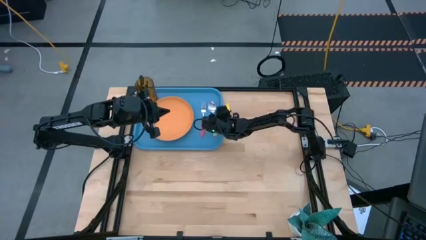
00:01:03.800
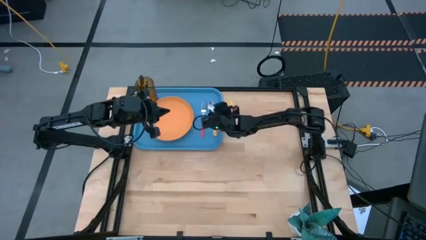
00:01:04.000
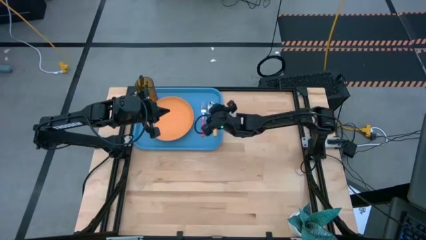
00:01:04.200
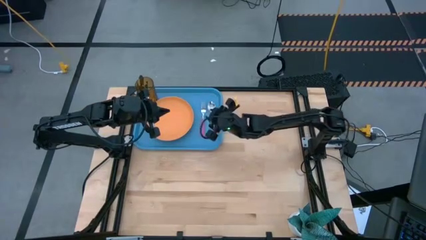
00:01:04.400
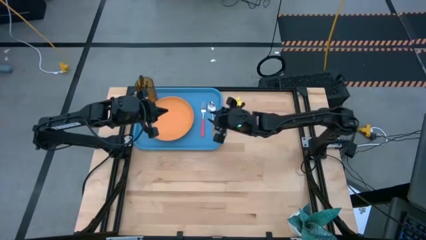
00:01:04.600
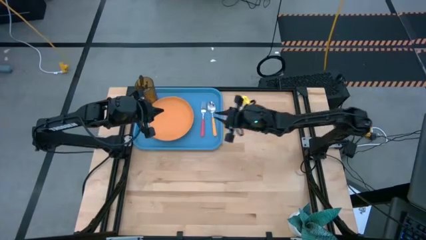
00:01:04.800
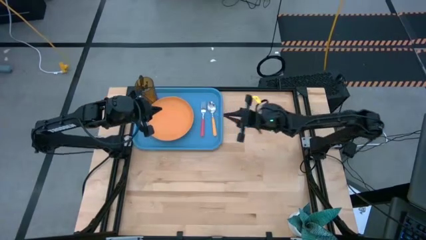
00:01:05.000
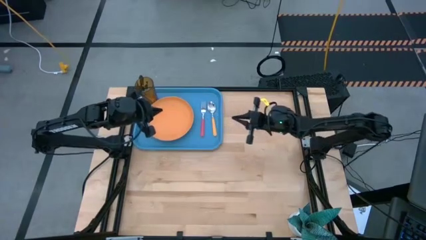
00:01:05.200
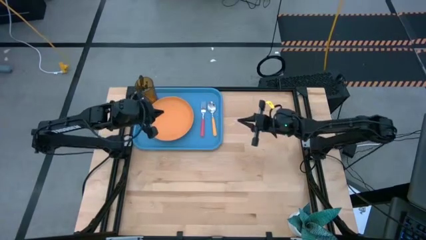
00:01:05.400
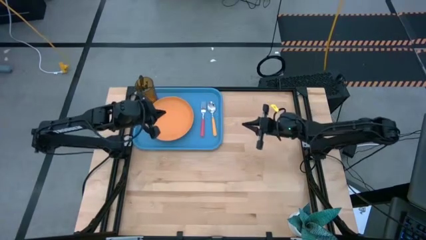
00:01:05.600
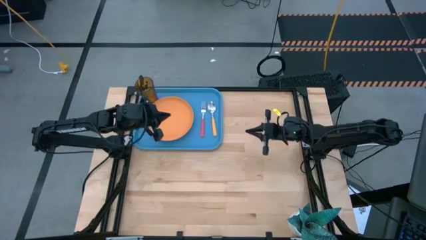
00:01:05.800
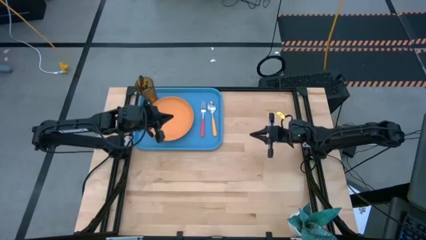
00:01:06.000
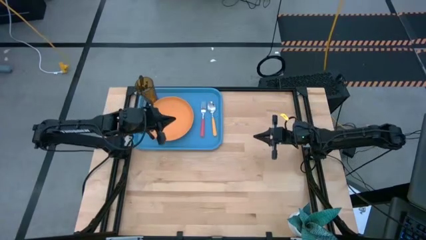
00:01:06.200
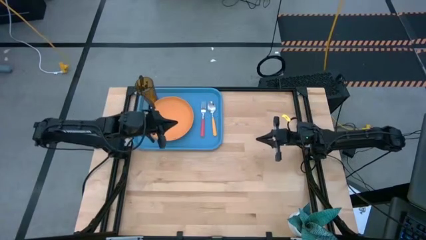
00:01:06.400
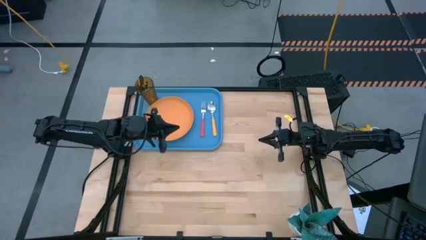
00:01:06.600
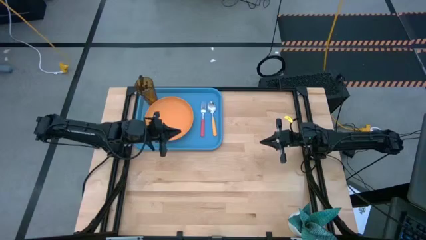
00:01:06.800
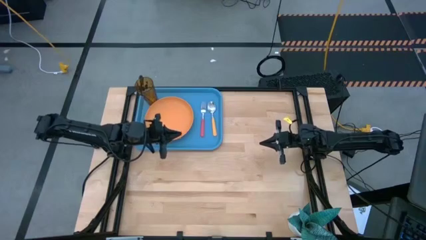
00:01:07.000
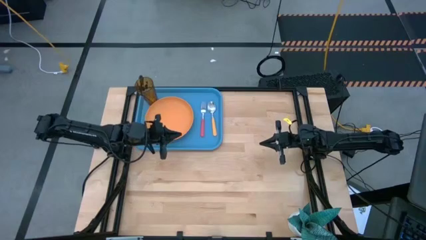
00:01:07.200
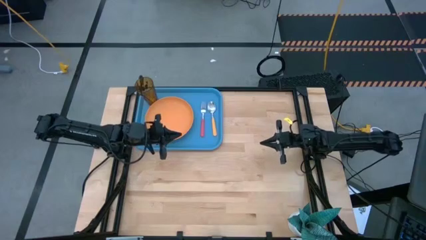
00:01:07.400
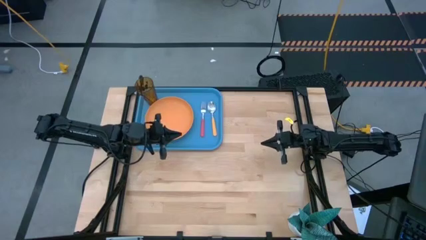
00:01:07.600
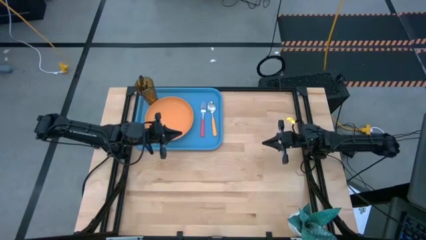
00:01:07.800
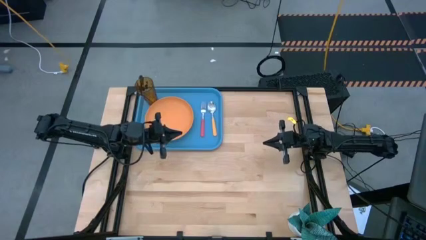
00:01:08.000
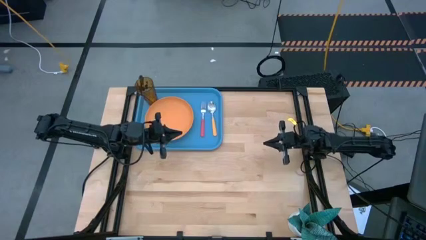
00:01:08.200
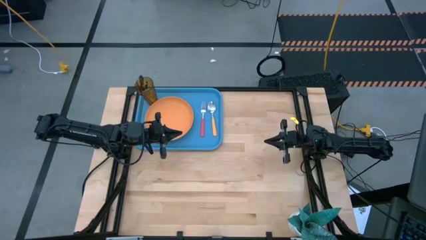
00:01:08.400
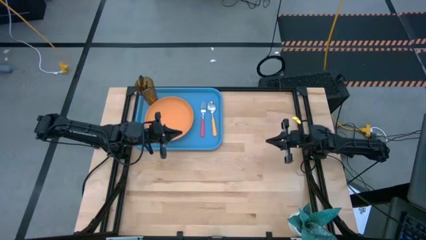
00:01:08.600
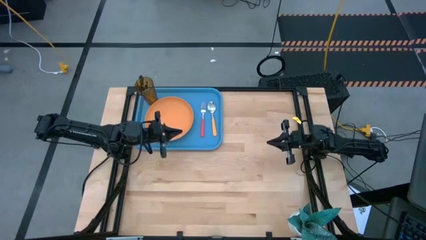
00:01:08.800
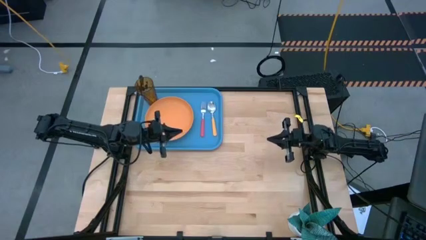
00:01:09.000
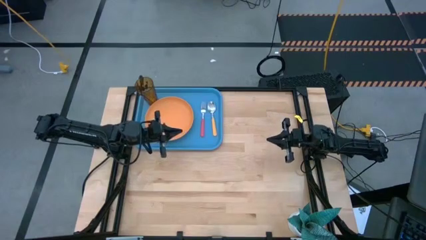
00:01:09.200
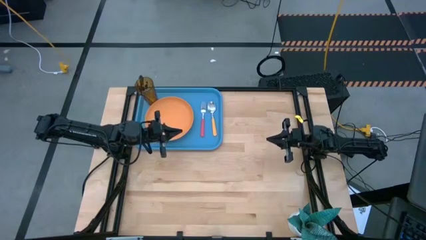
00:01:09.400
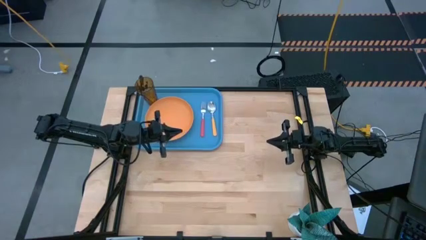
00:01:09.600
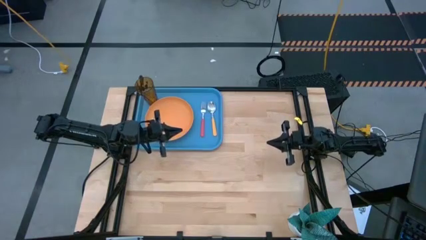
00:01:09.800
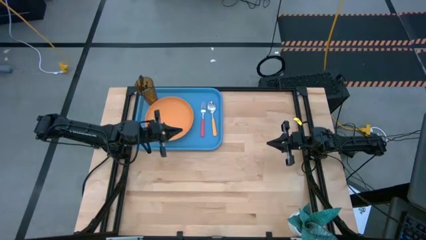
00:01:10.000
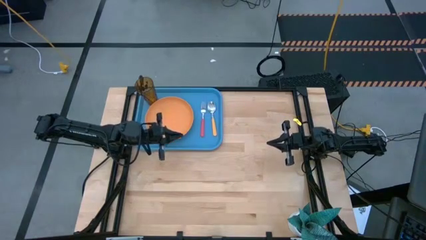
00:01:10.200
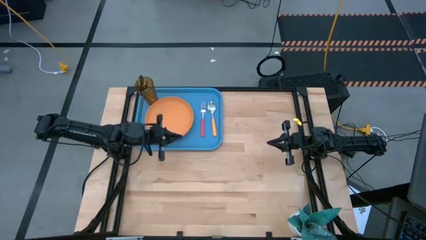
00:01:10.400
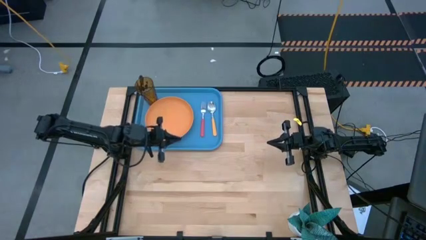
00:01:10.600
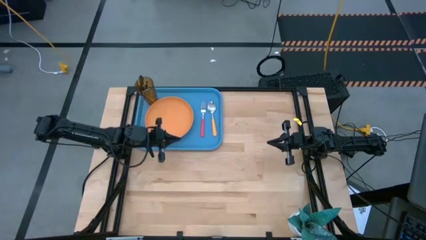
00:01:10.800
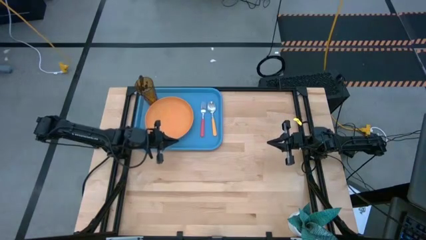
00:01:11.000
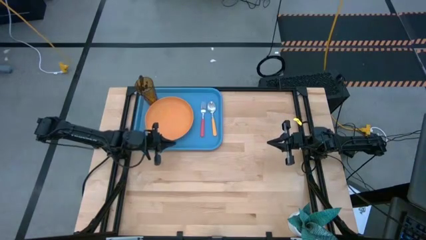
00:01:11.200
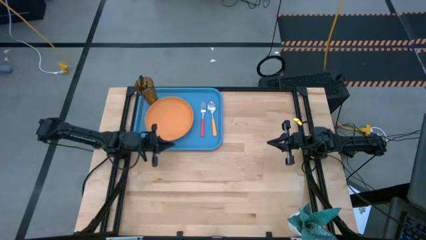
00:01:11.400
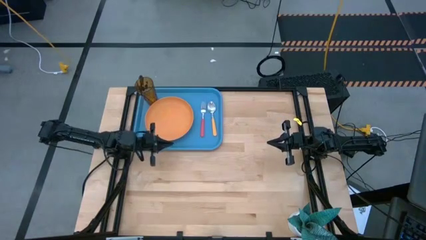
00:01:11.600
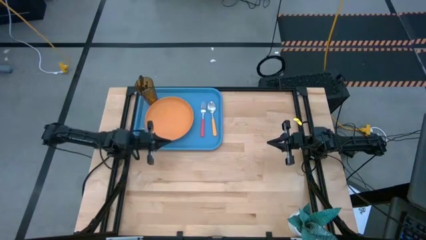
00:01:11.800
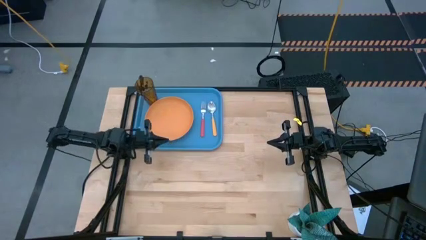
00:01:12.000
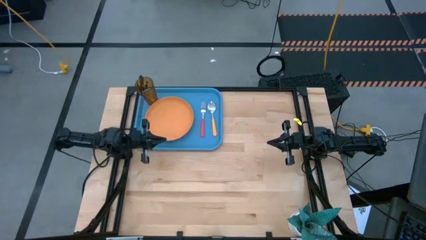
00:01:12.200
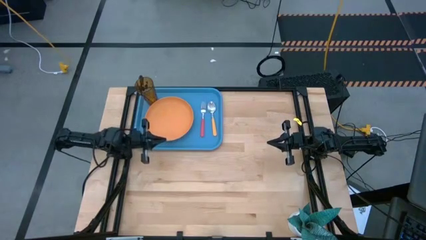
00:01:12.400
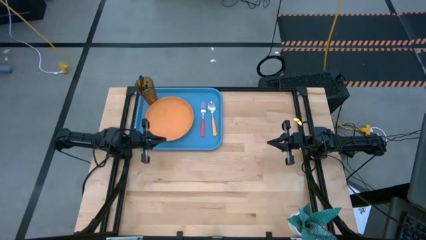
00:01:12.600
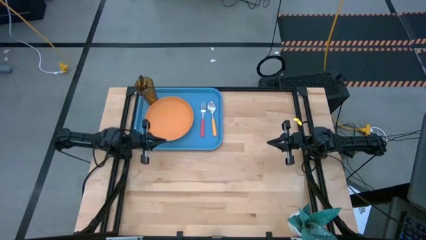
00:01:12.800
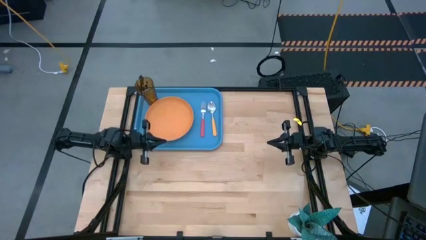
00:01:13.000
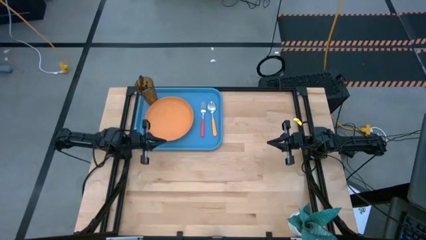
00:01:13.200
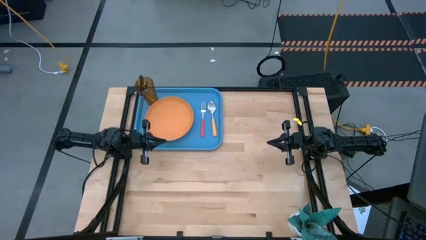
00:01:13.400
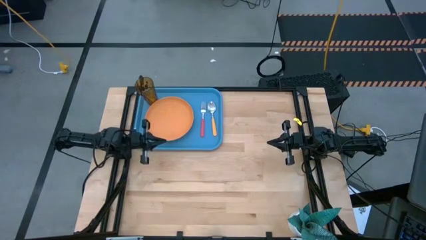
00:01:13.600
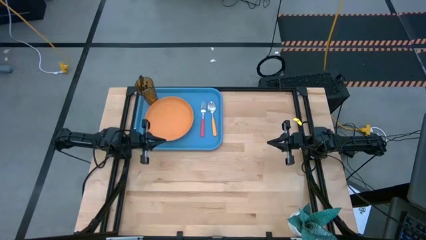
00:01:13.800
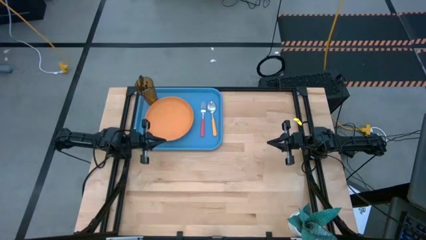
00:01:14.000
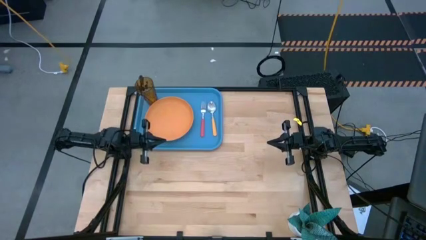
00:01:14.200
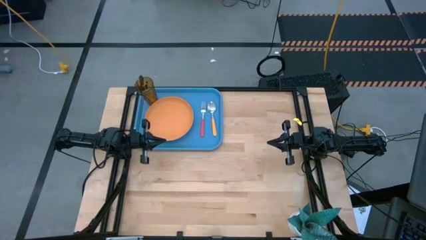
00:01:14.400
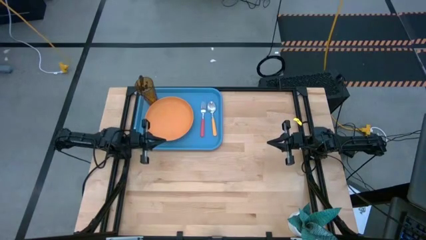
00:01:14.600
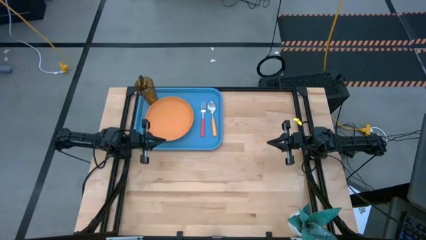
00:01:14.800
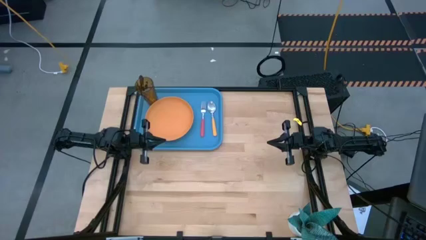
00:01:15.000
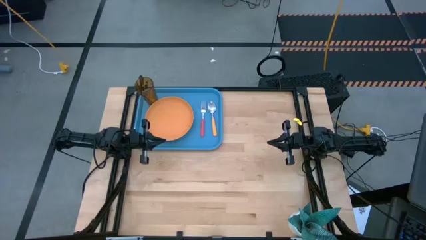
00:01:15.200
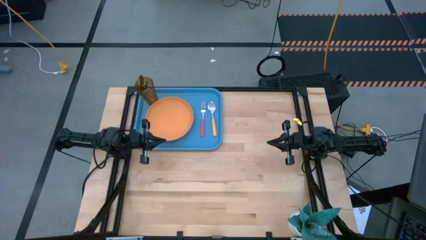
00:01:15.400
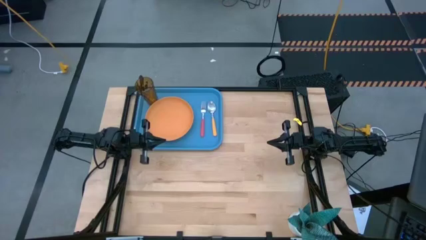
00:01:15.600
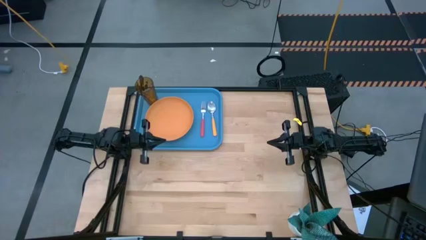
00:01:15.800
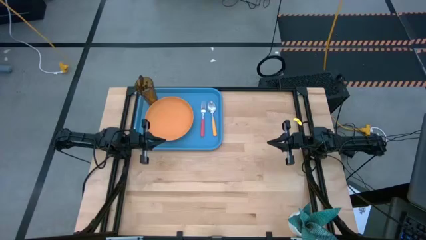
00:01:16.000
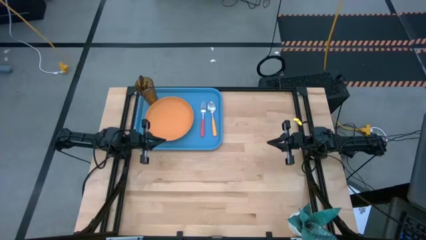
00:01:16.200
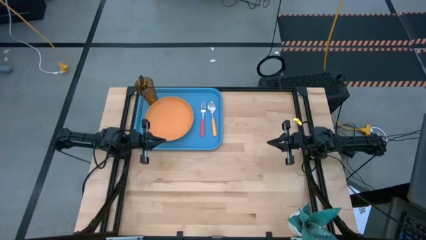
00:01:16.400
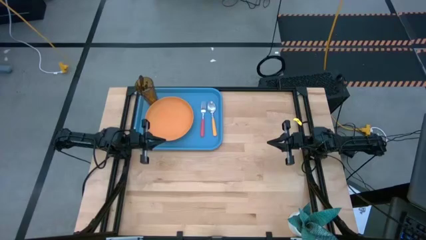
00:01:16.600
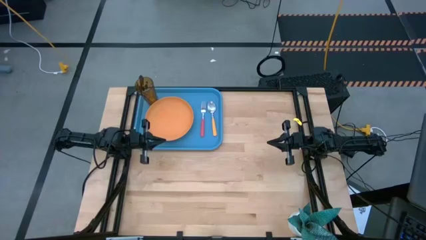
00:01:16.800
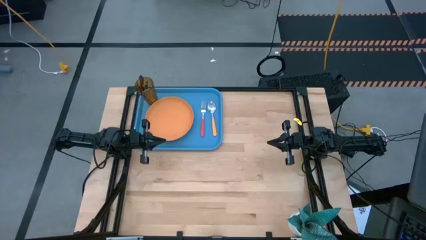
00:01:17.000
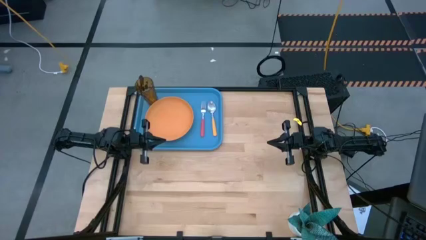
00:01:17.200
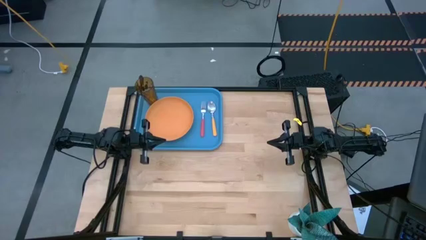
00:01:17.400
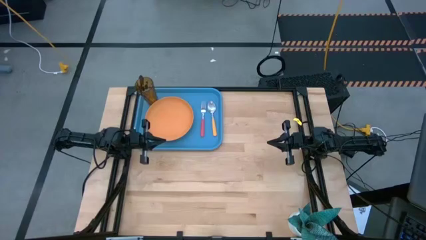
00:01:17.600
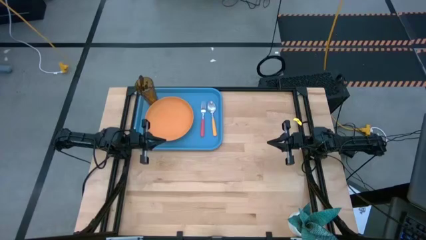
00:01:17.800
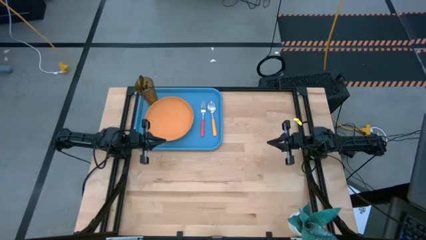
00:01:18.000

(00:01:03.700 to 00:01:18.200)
Task: Pick and place plate/cup/fork/spoon on tray
Return to Home Position

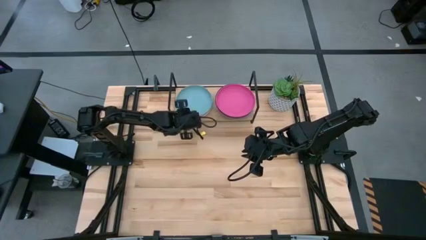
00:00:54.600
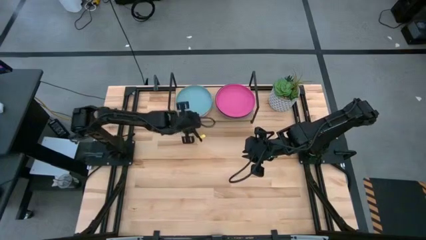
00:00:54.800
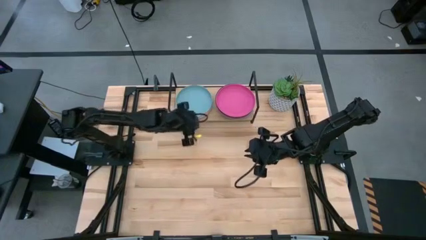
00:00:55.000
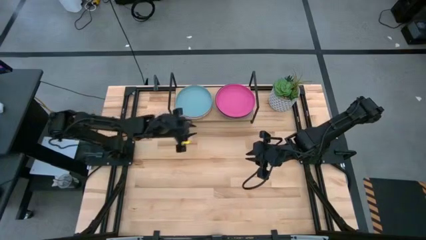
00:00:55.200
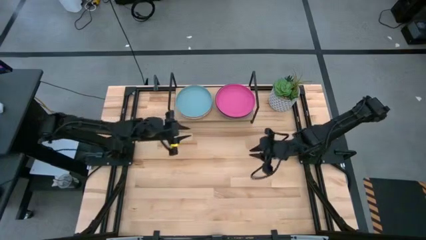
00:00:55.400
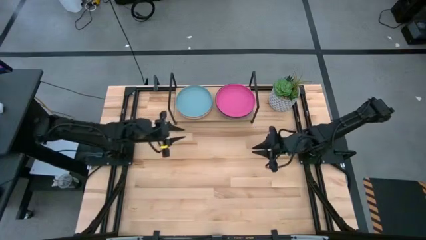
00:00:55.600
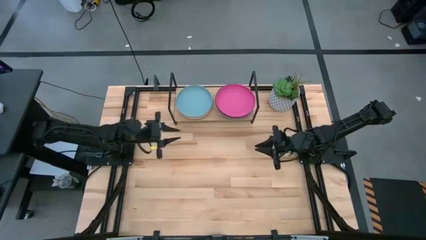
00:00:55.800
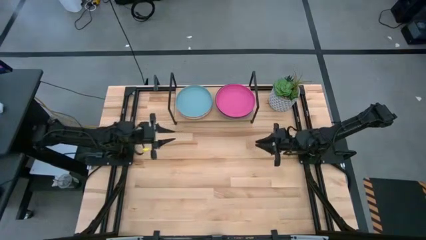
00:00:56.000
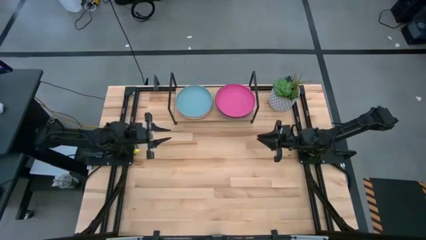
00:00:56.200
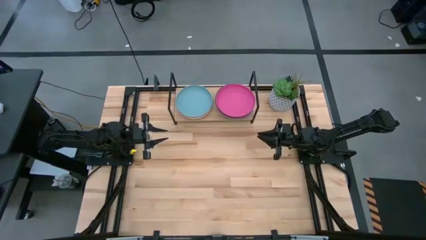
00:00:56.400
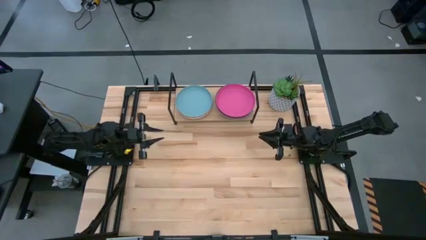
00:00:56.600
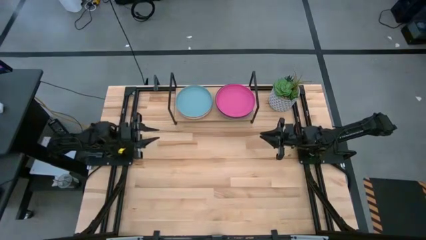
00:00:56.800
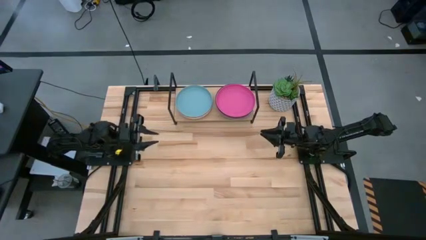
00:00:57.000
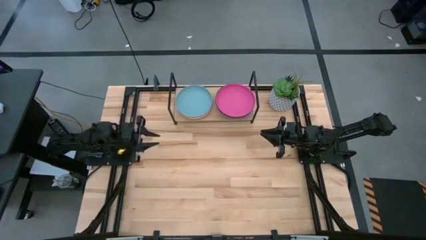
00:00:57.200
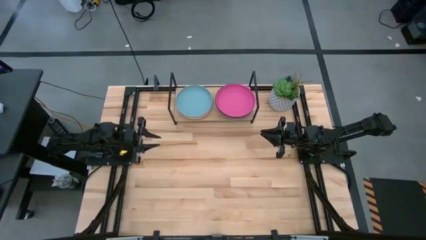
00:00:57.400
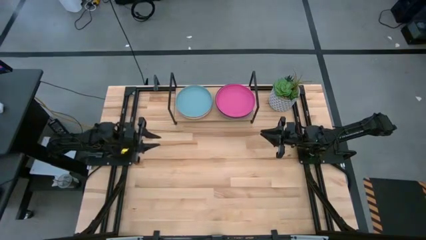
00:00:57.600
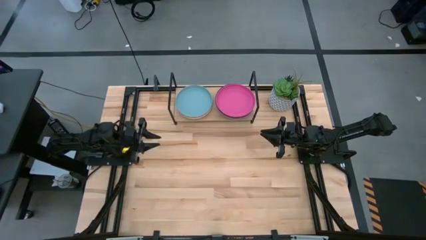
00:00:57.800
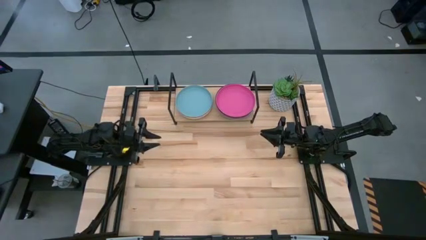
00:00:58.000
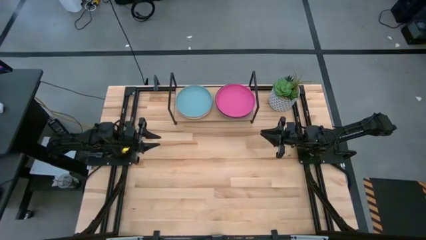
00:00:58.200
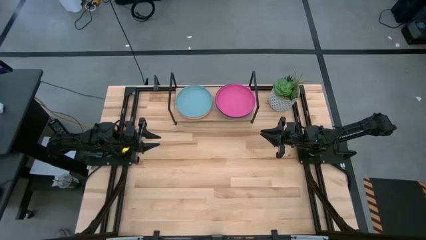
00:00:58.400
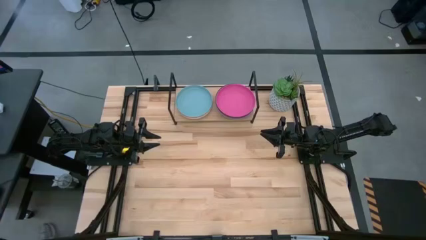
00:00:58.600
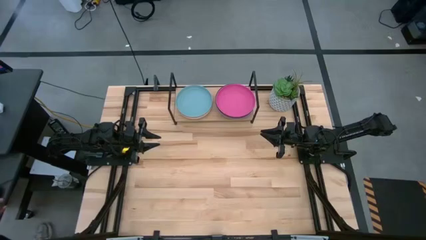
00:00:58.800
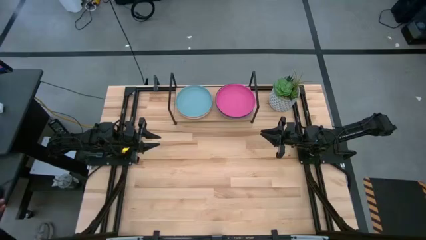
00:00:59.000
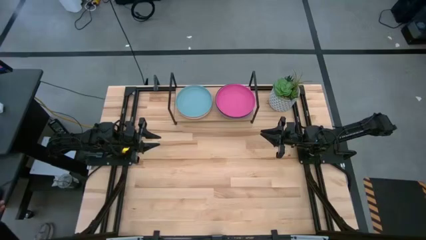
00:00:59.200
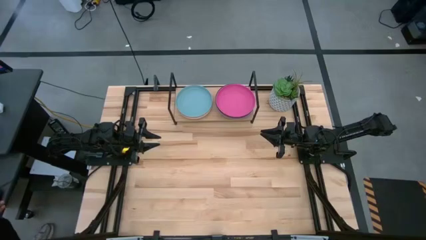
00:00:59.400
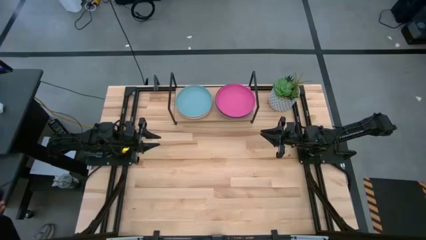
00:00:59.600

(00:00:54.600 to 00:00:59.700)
Task: Place and stack plates onto a shelf
Return to Home Position
